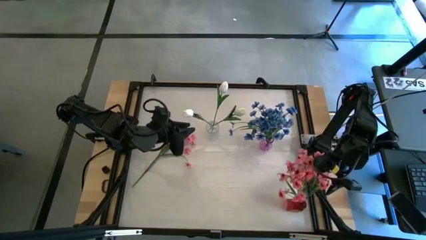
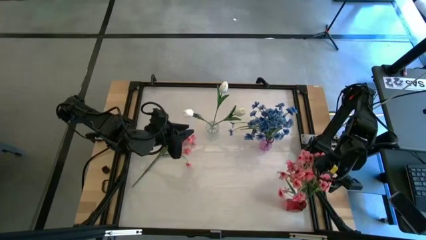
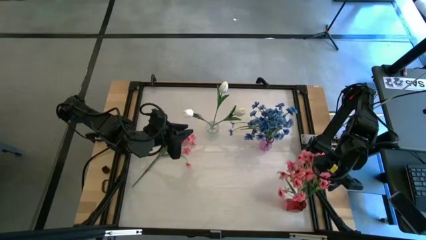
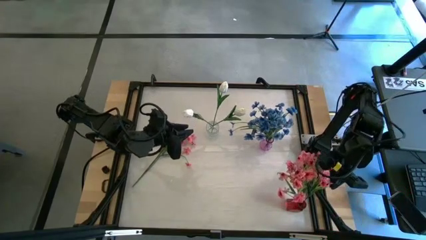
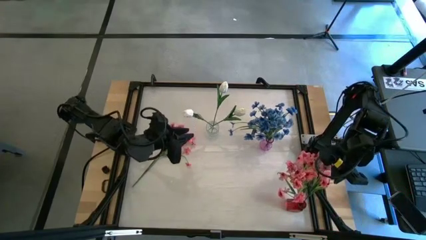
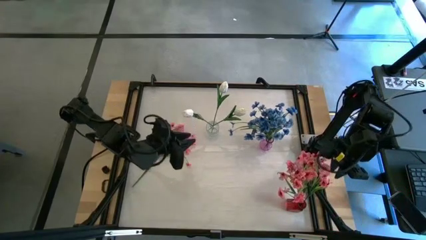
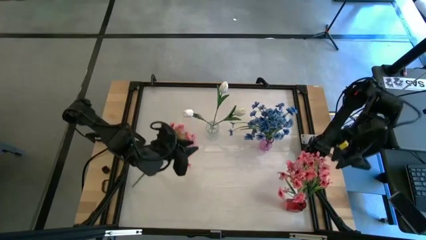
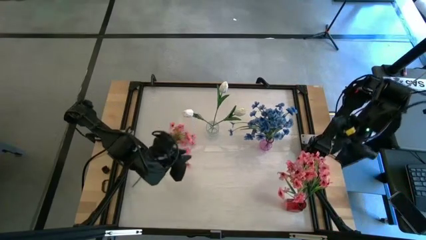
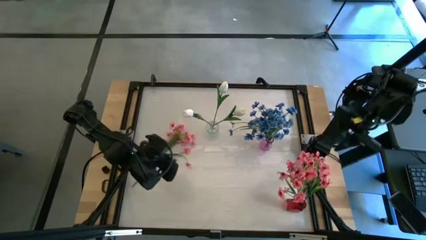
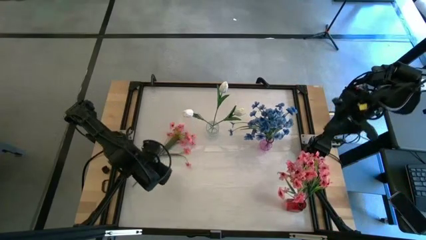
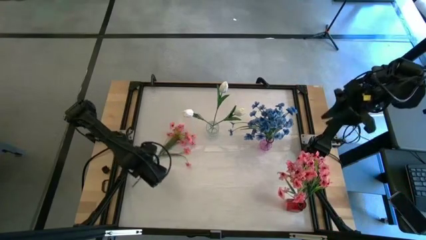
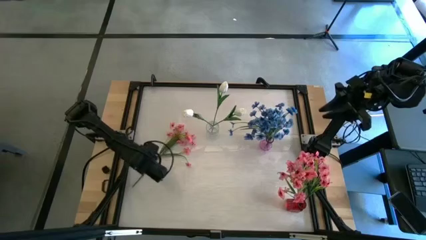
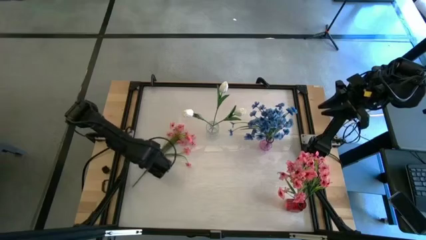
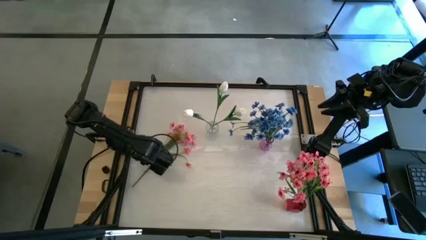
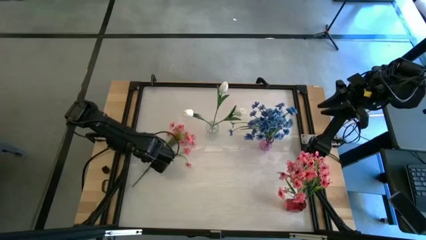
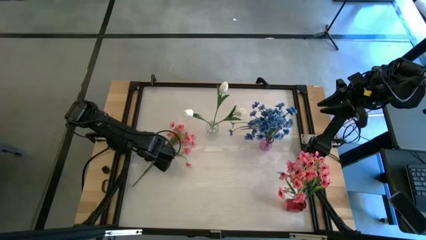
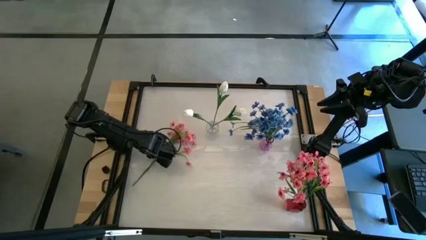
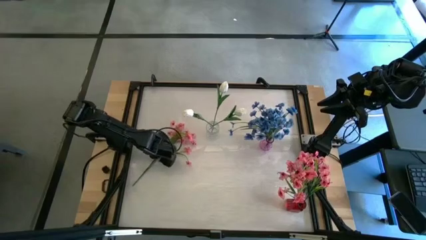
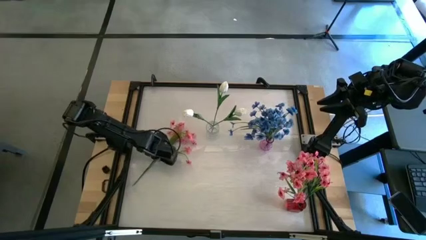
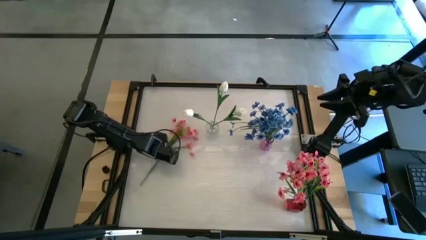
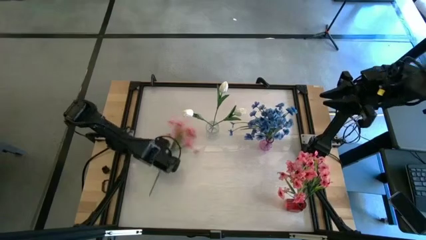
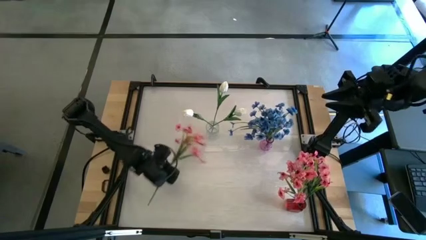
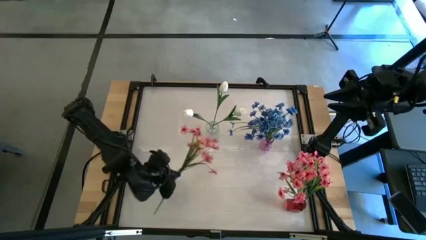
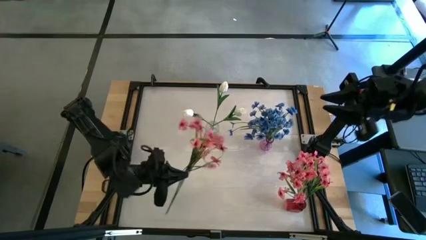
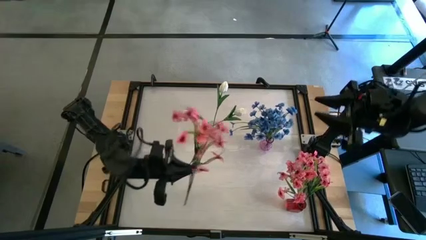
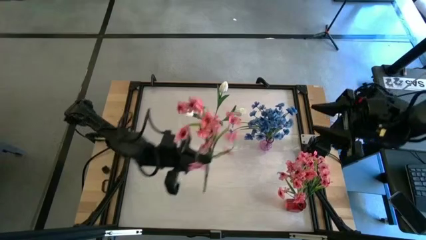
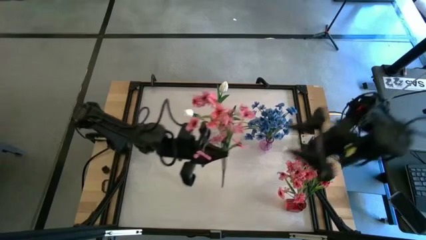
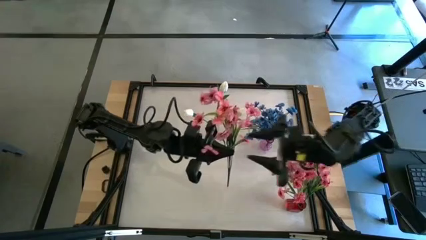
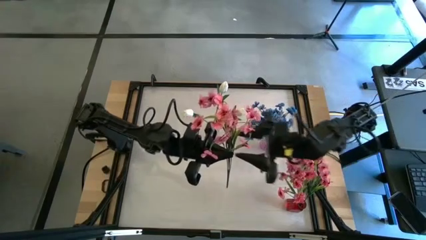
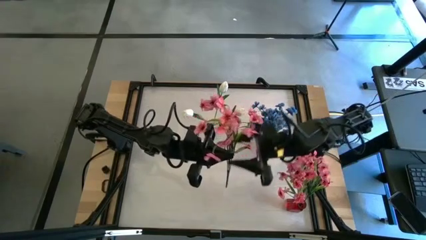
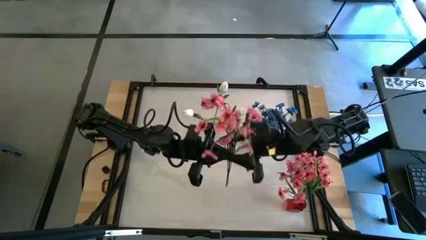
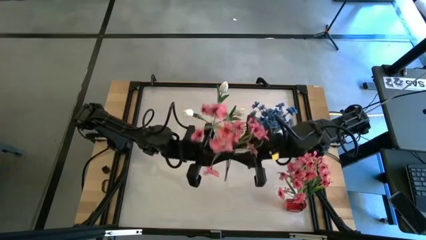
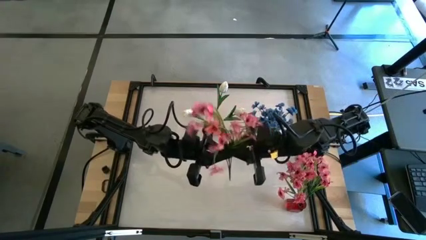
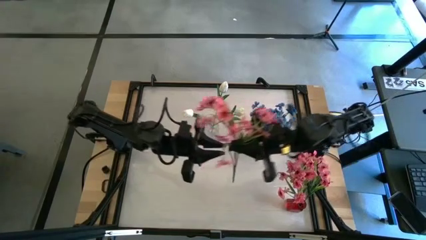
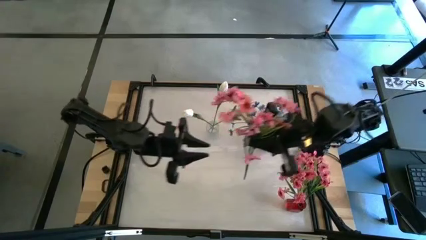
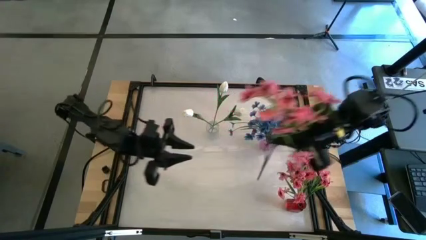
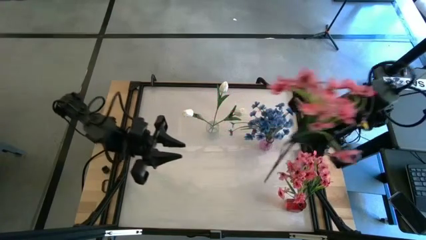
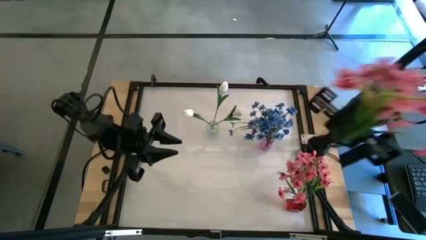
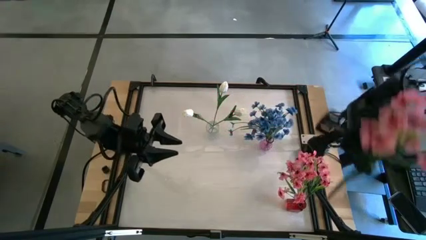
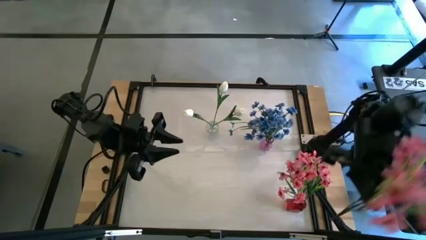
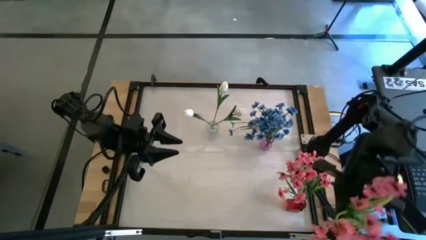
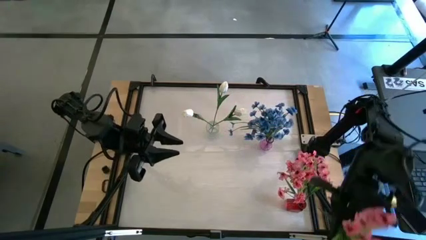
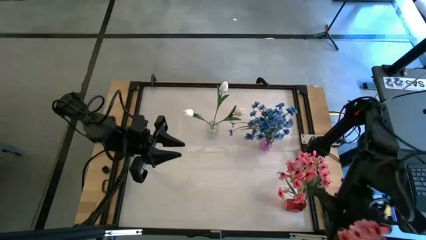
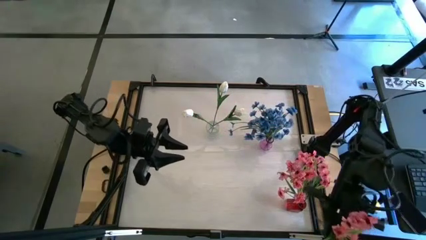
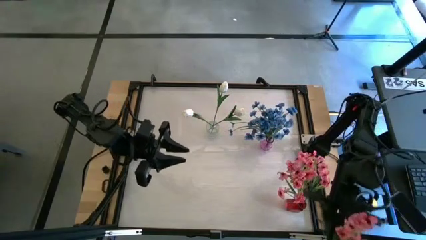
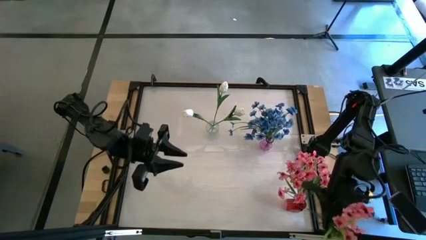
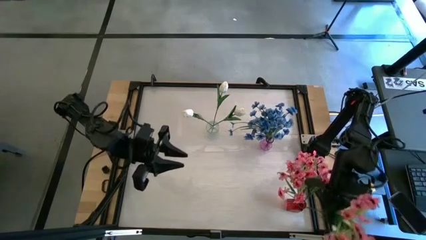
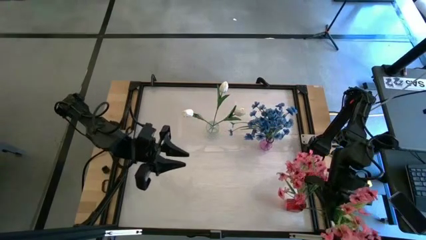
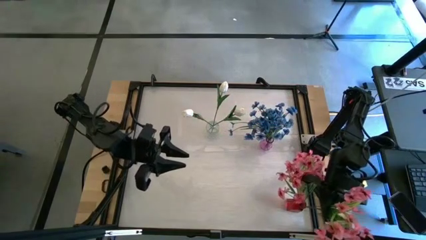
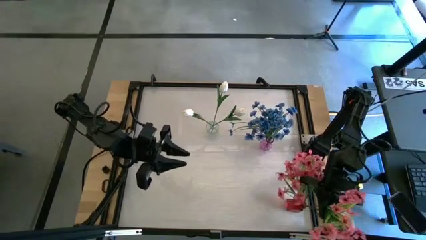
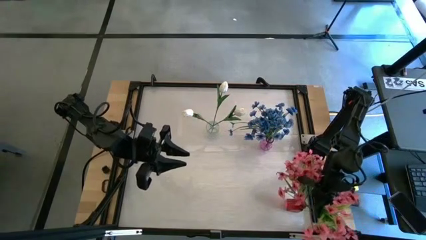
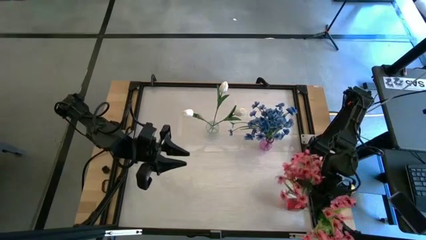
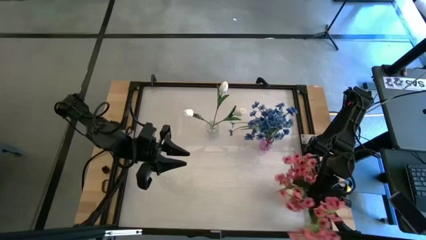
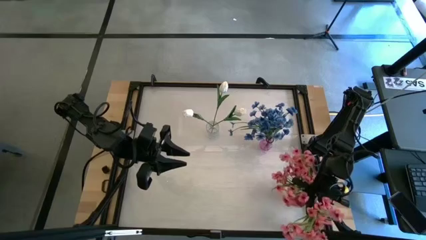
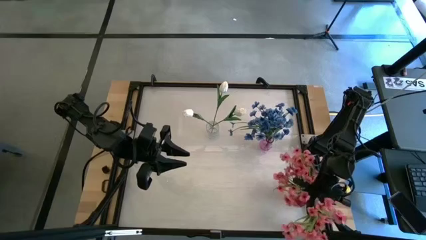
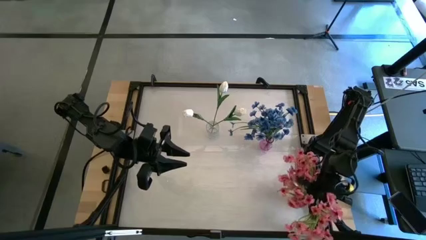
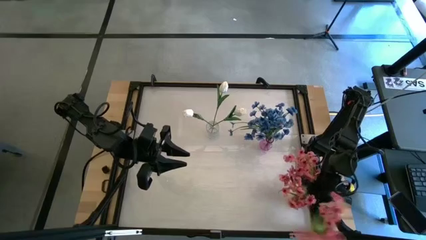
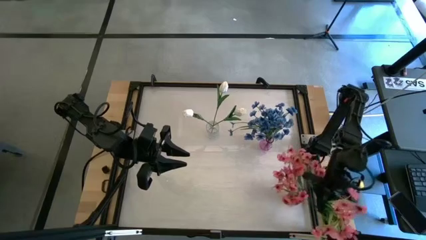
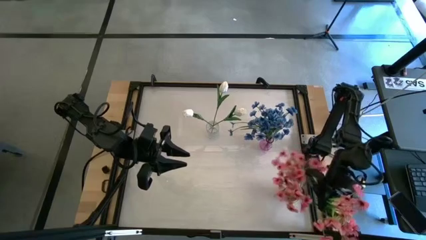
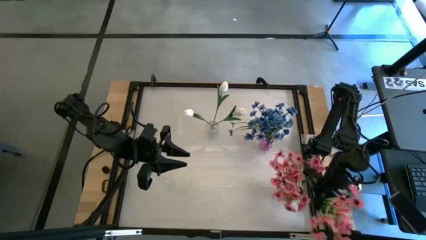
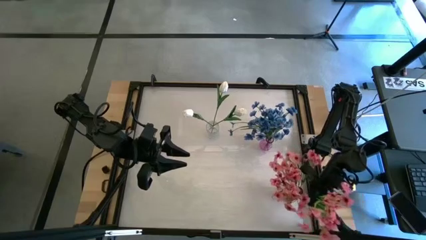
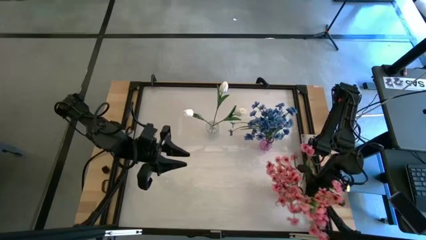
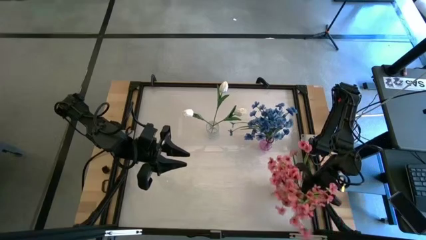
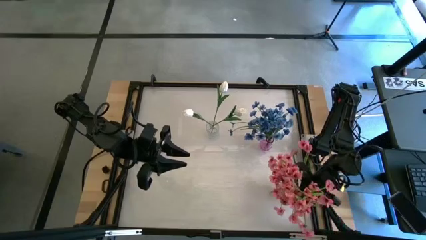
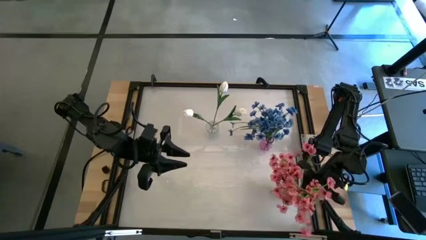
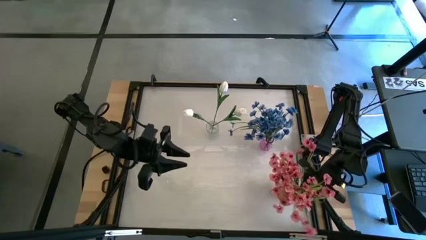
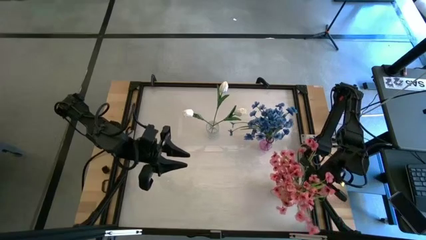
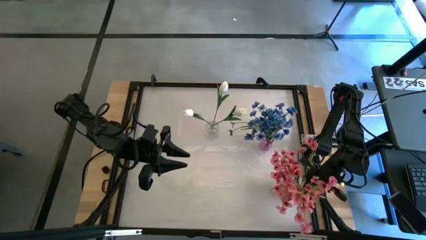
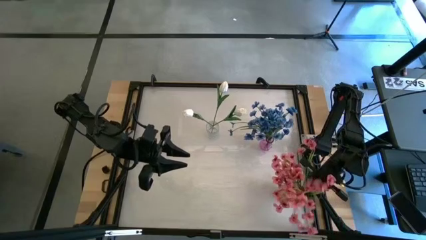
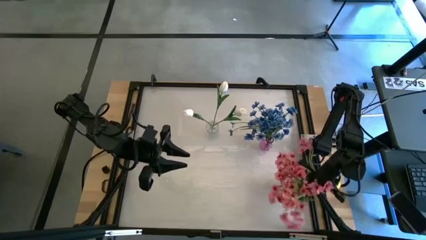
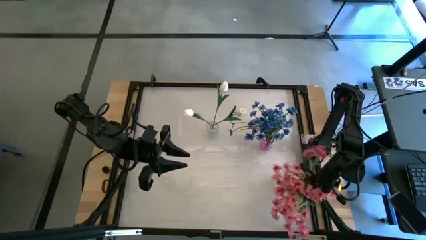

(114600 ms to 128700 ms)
Task: Sort flowers into vase by color
Put the pink flower into the red vase

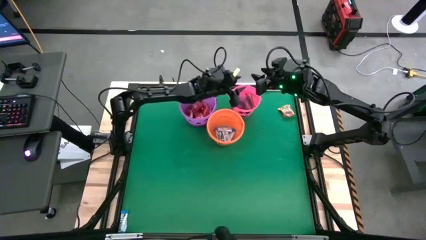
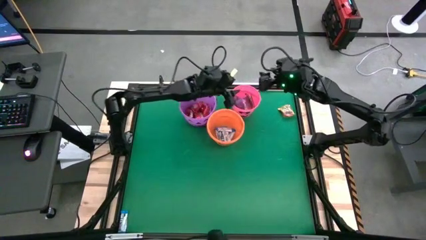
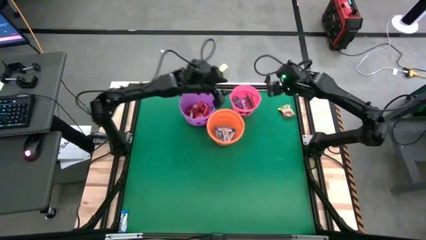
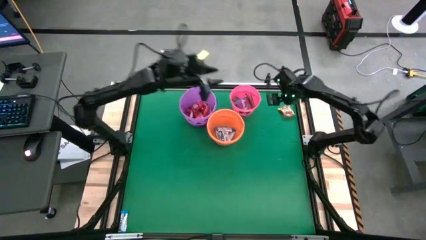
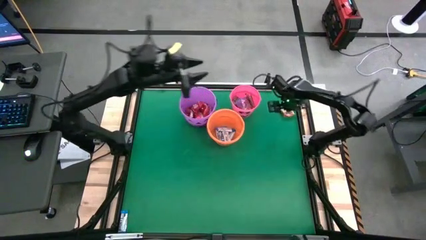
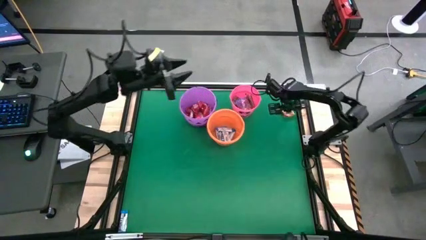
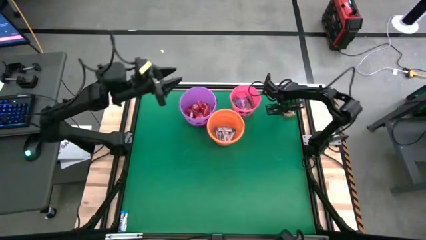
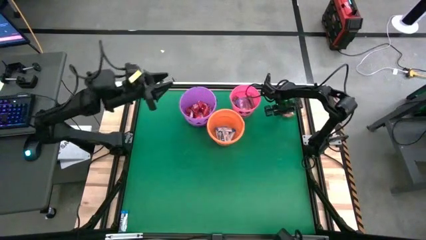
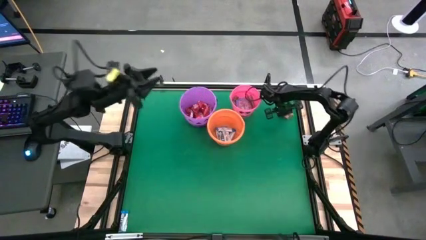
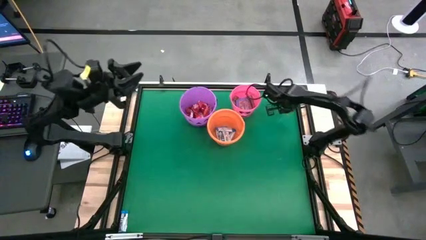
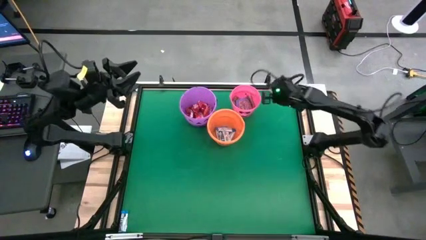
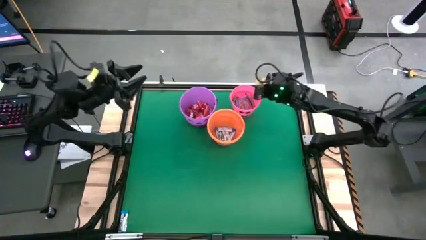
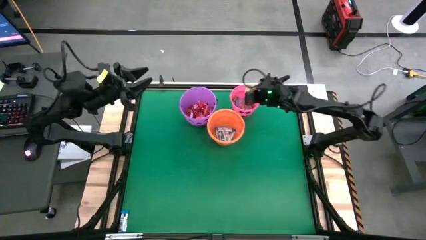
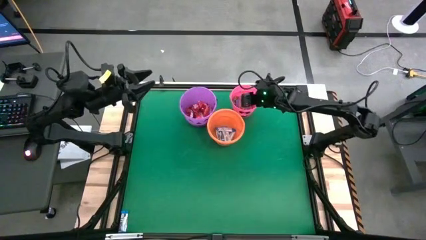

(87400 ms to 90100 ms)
Task: Sort candy by brand, put in halloween buckets
Put the gold gummy candy into the pink bucket
